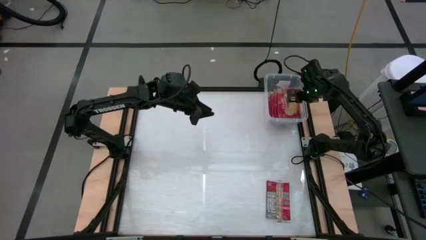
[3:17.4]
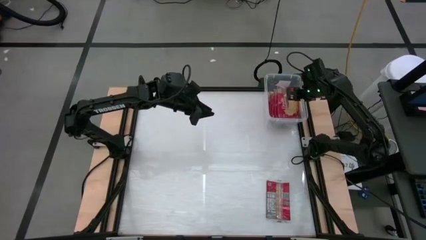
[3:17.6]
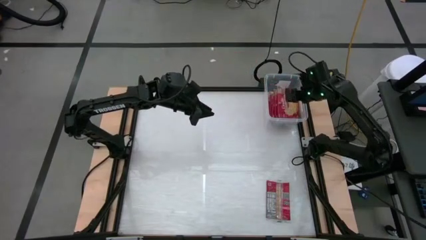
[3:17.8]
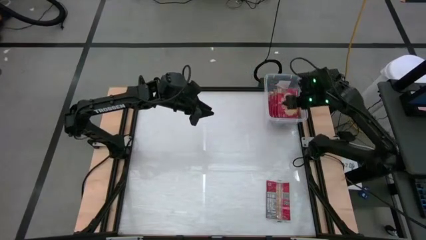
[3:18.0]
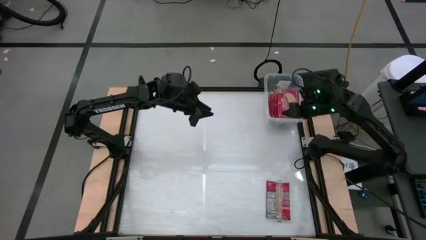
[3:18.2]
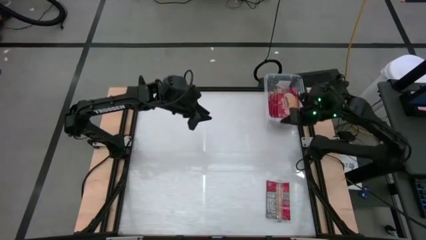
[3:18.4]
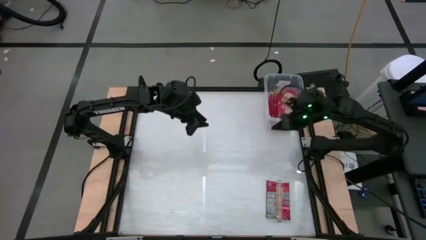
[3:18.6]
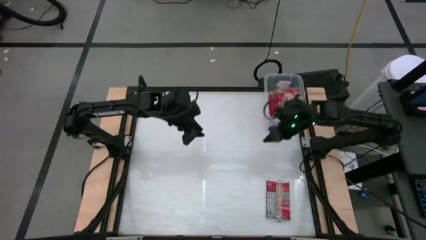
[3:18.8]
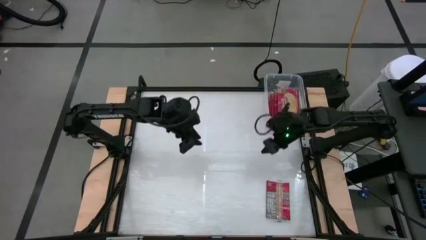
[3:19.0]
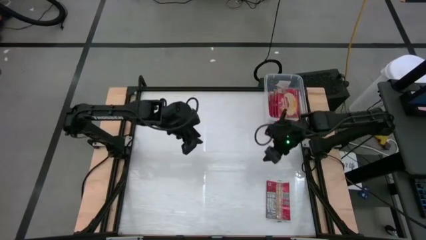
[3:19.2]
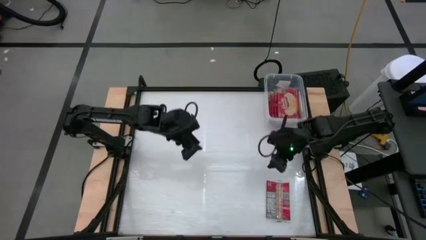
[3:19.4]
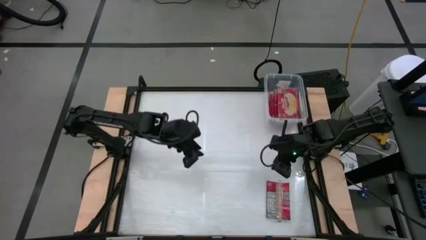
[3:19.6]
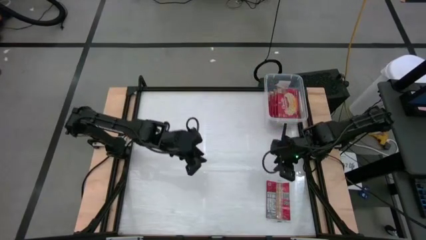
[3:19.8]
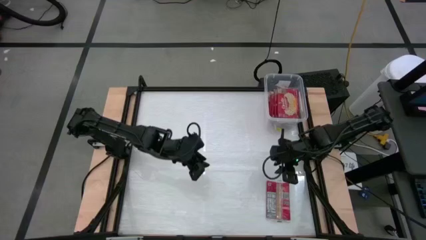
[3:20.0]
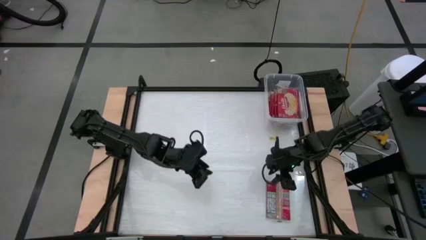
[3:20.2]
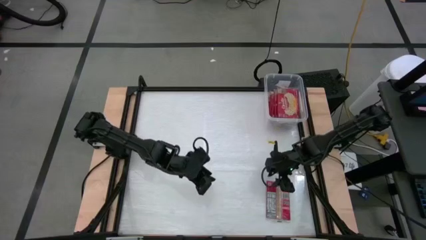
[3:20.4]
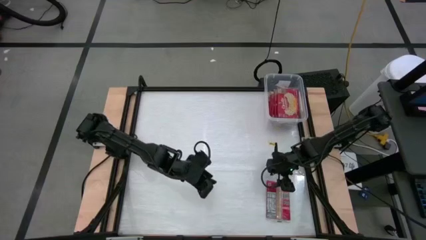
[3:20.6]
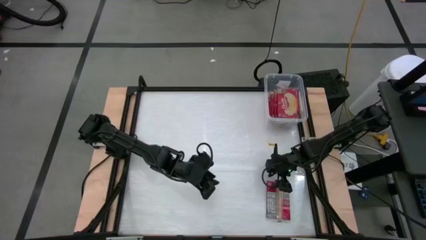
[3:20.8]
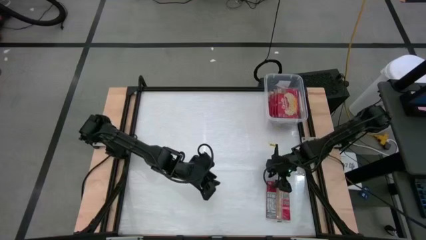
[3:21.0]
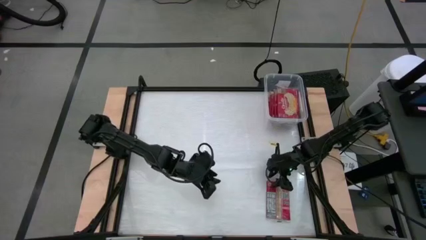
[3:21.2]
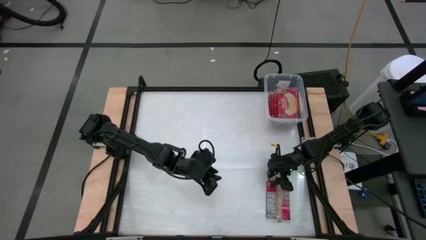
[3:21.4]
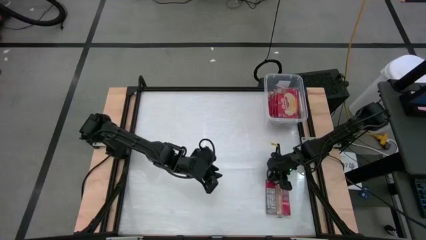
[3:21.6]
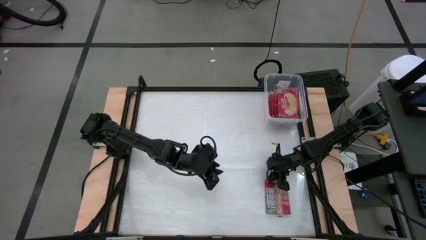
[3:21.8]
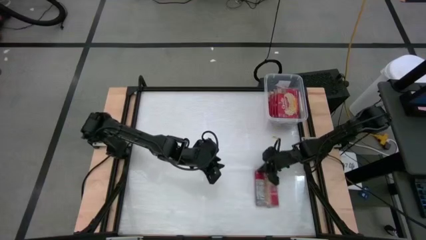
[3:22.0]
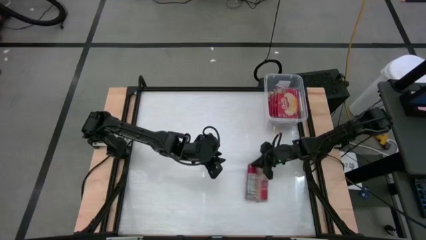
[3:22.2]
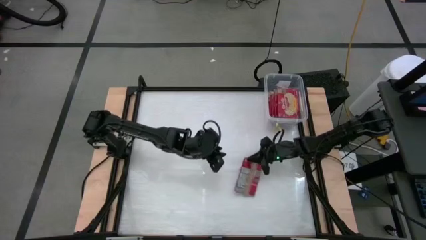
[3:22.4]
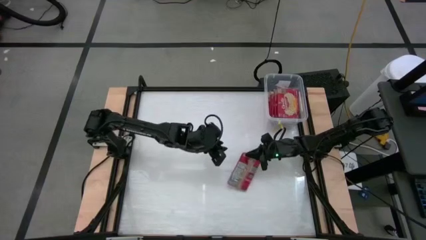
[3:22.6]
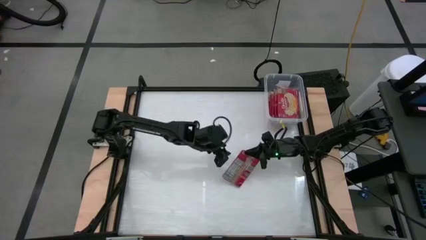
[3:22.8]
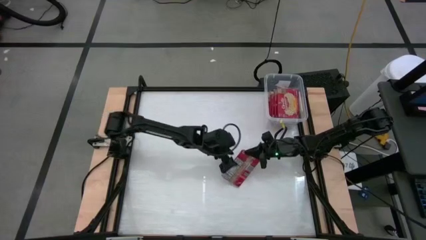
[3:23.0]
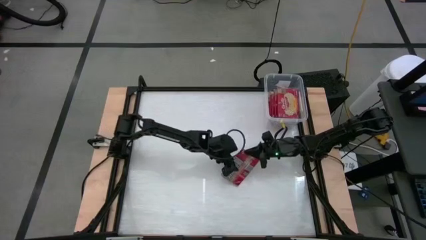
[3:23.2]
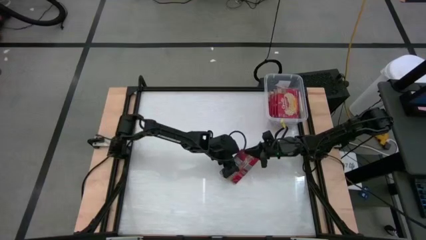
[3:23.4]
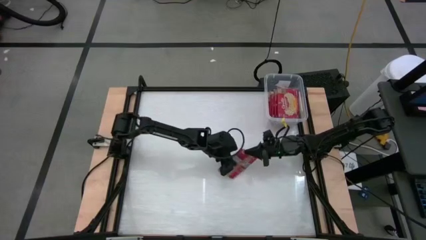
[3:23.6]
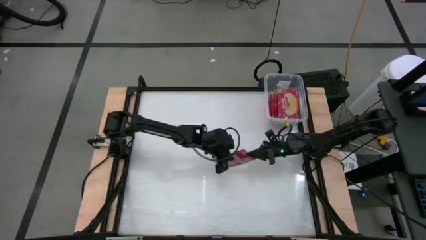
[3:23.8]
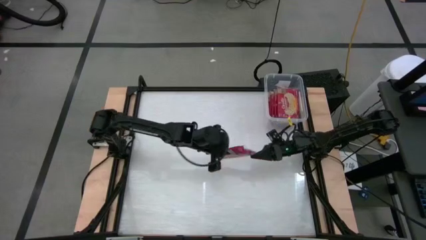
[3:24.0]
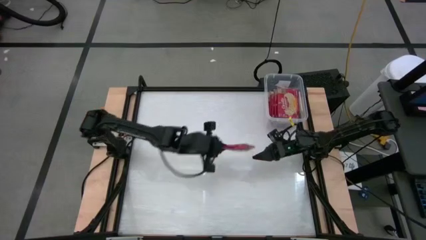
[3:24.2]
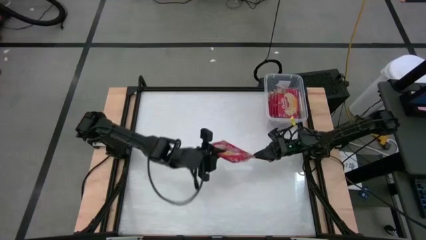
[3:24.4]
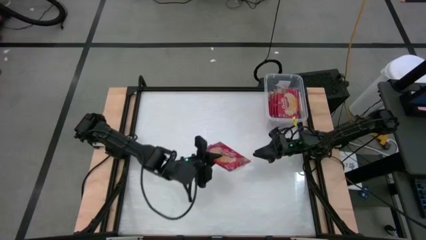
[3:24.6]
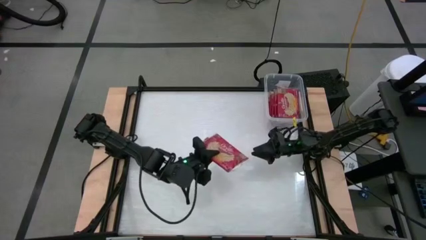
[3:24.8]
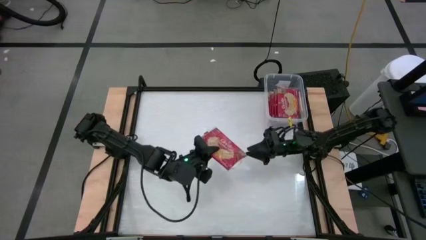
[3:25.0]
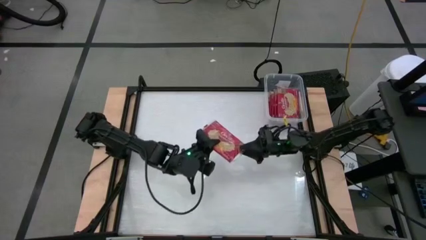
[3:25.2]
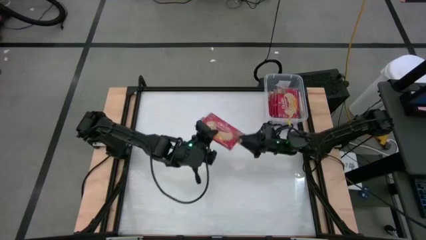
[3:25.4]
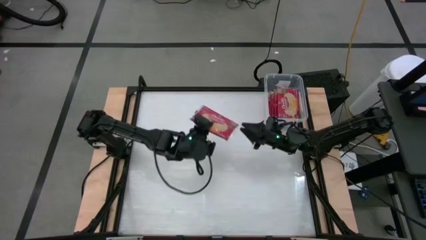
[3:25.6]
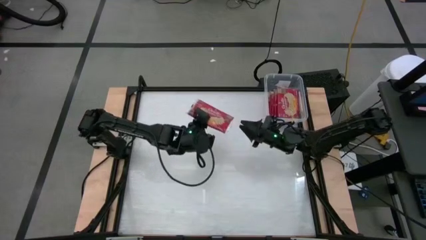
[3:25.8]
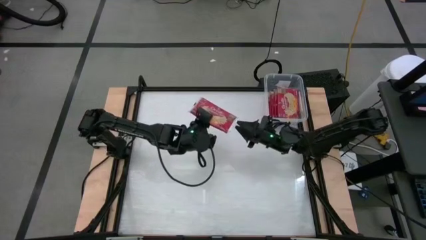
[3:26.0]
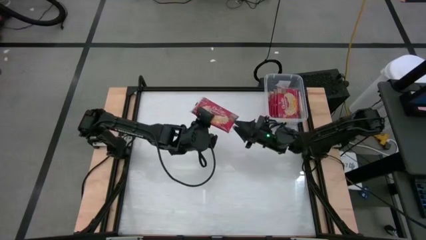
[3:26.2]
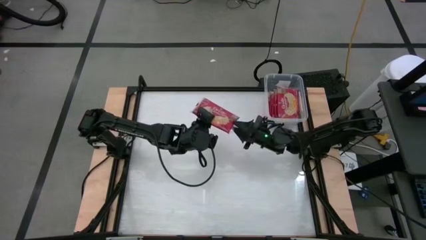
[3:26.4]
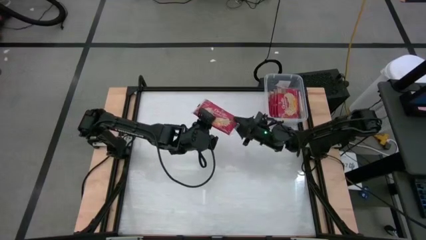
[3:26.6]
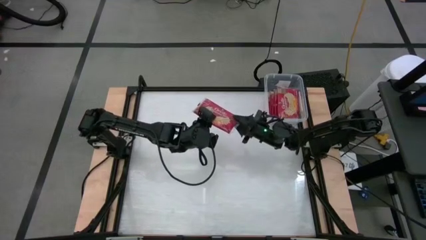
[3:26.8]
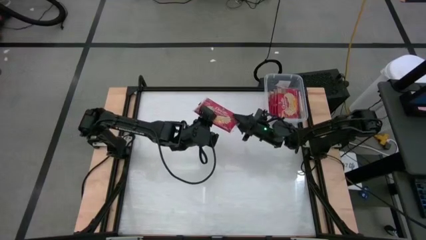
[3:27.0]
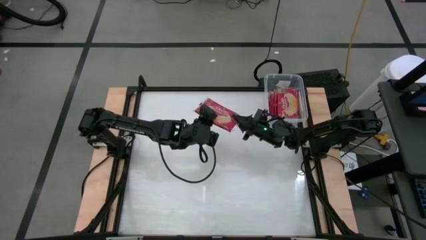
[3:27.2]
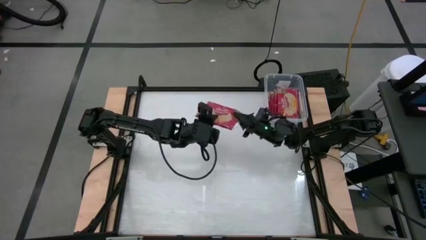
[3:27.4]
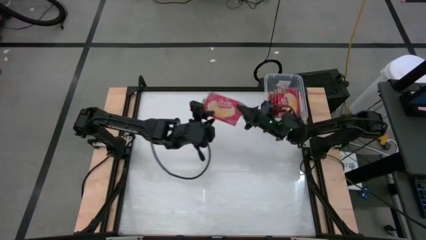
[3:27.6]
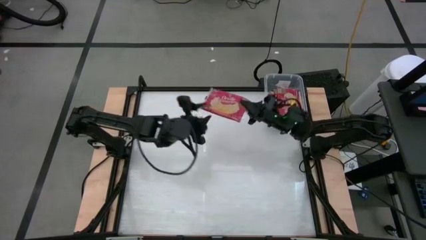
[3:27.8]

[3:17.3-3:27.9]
Task: Sort popcorn bags into baskets
Put the red popcorn bag into the transparent container

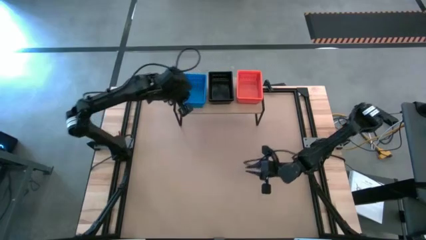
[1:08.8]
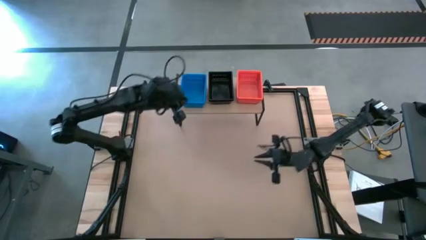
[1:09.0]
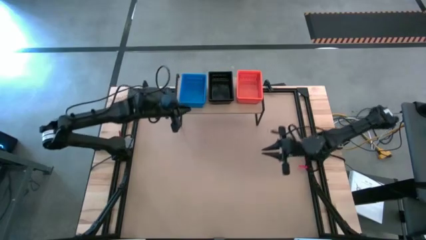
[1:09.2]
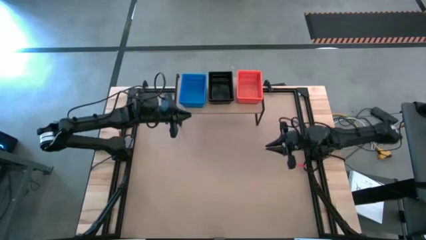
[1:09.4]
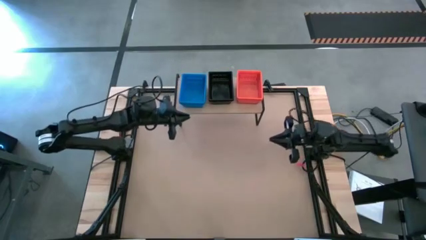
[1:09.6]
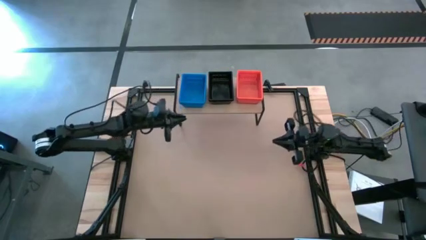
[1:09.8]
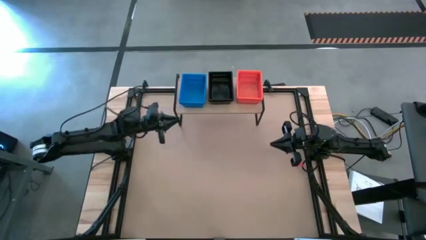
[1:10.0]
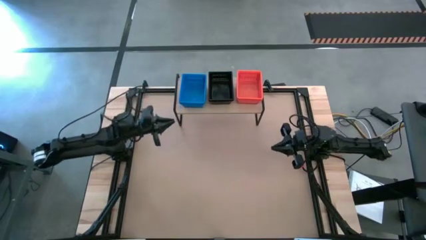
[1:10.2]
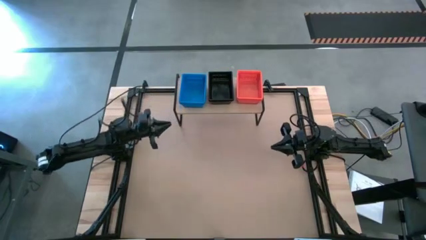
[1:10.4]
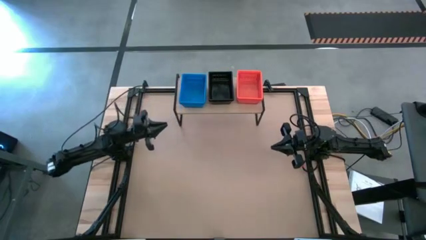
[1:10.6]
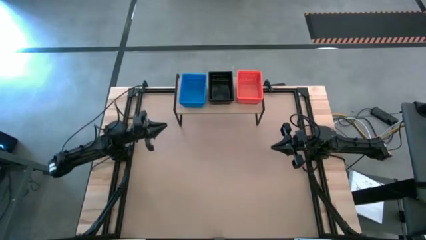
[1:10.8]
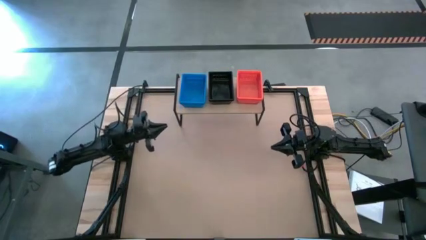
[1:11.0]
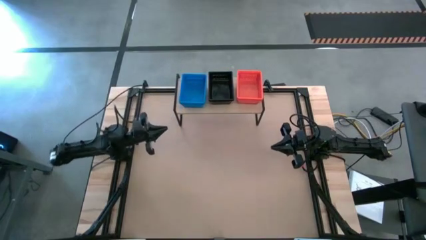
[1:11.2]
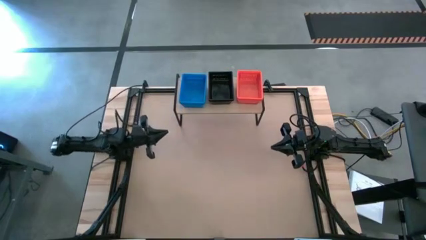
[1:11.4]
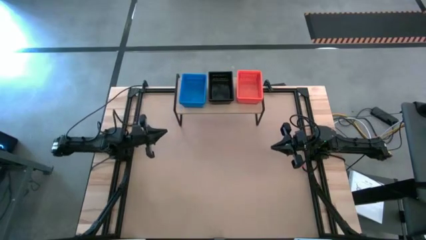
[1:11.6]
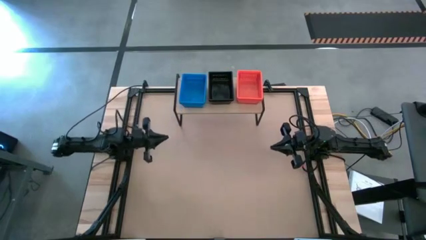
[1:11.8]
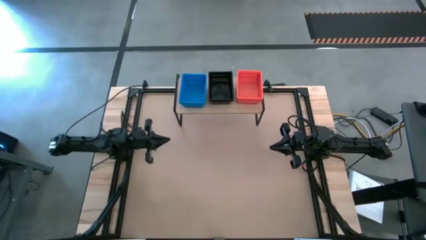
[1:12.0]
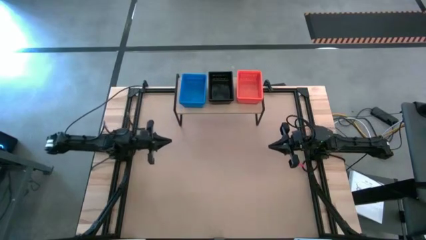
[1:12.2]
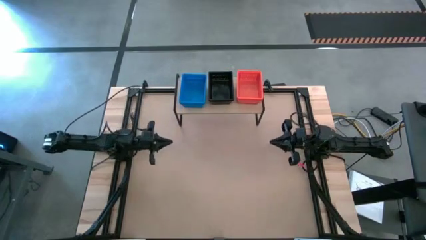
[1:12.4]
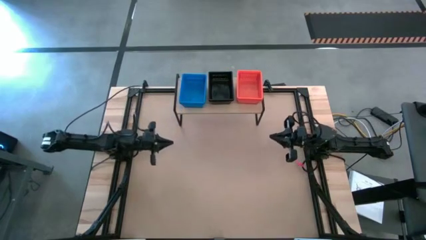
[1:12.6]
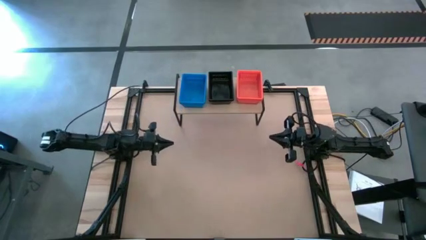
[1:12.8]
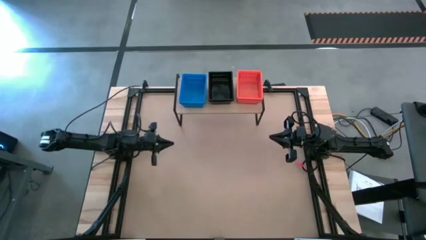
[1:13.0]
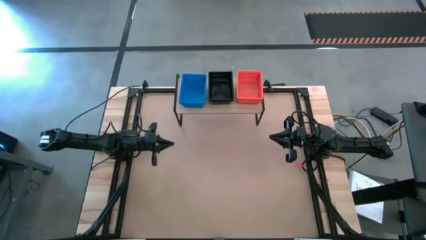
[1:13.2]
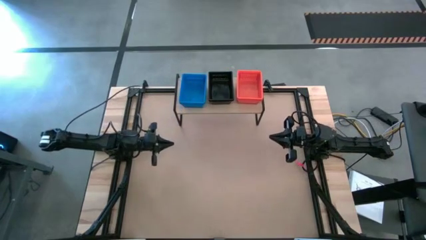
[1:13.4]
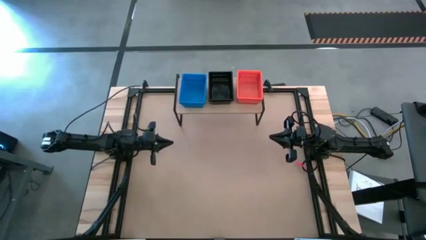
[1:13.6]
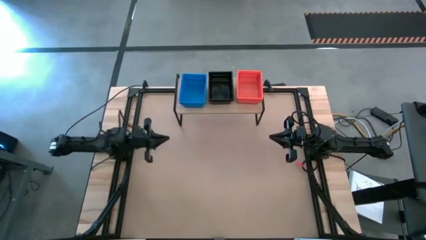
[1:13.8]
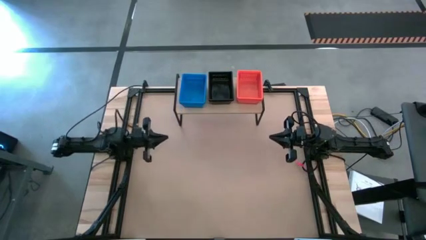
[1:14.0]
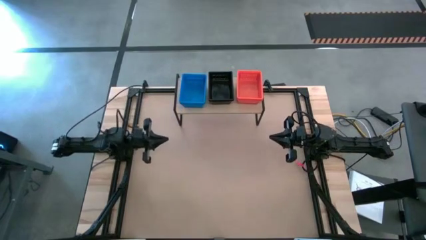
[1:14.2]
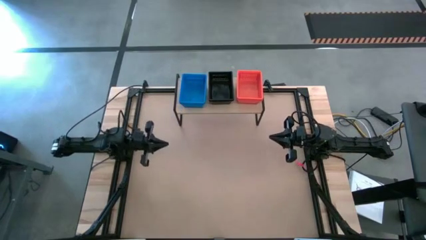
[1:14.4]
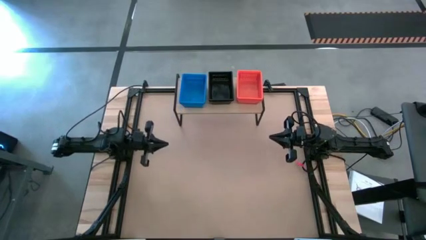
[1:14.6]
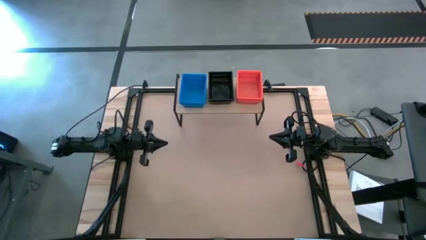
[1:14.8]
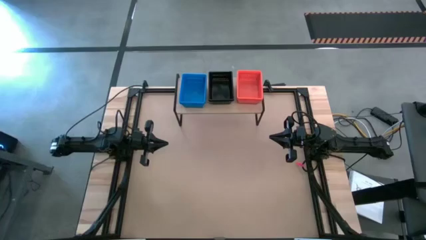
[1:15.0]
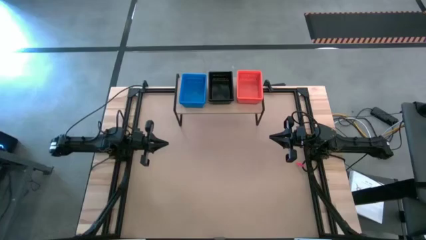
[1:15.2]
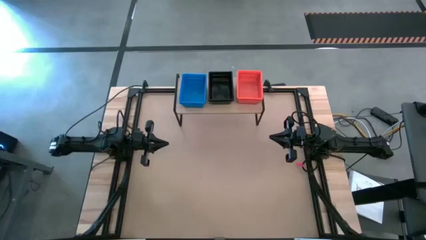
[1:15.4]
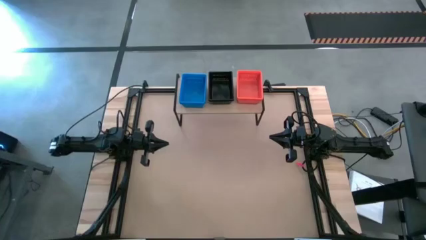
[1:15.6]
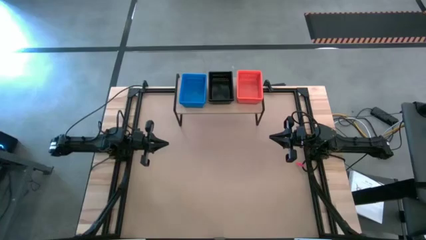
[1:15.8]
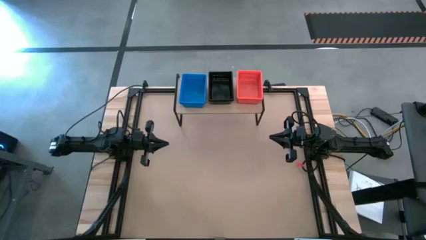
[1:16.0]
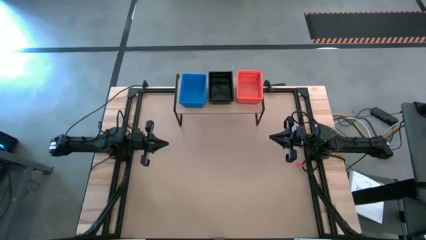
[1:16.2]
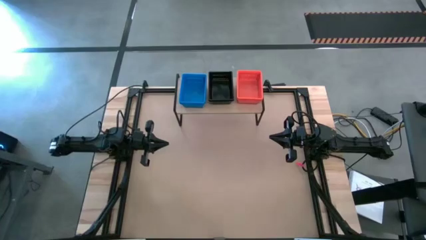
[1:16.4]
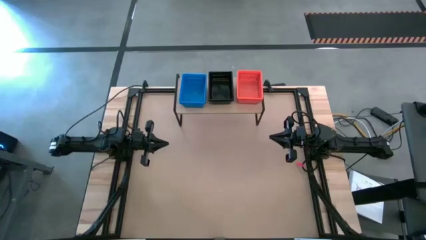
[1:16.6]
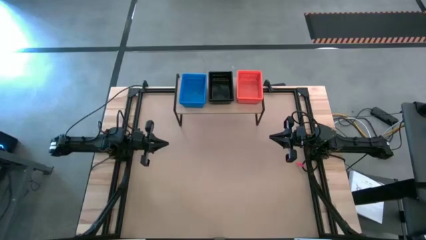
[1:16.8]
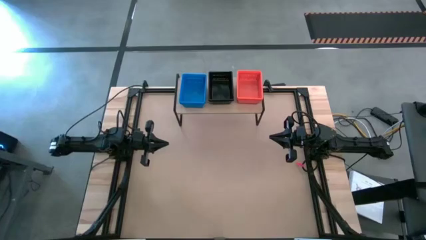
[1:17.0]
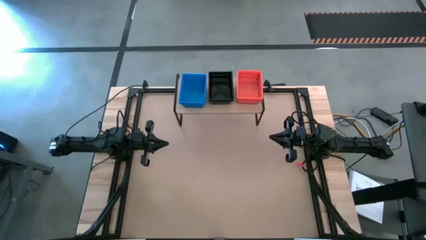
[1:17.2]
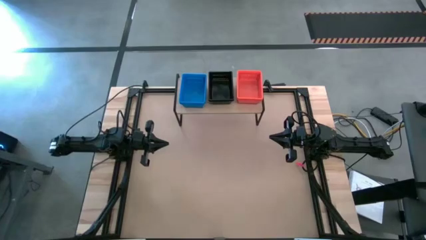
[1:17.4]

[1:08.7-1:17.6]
Task: Stack baskets on shelf by color
Return to Home Position
